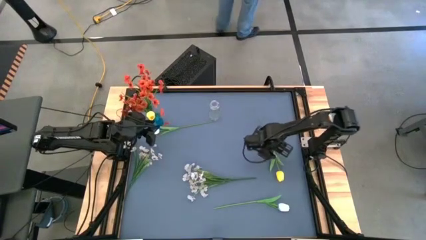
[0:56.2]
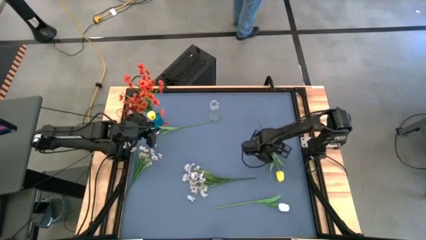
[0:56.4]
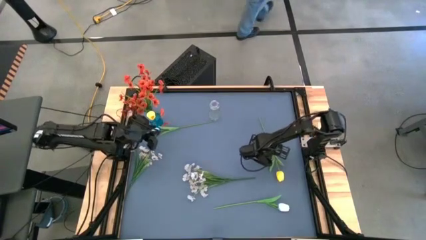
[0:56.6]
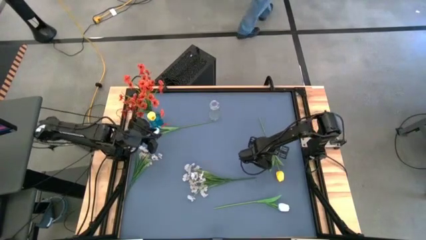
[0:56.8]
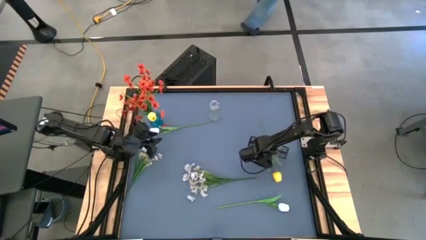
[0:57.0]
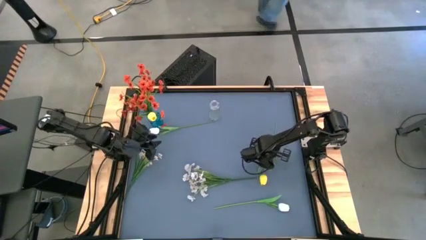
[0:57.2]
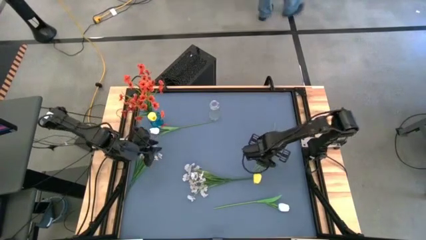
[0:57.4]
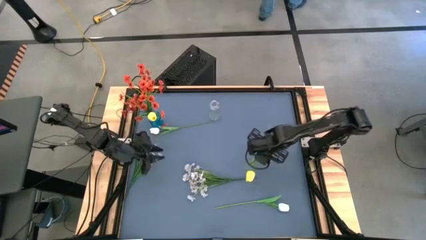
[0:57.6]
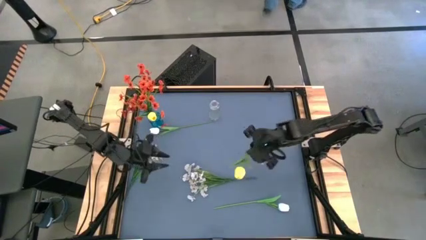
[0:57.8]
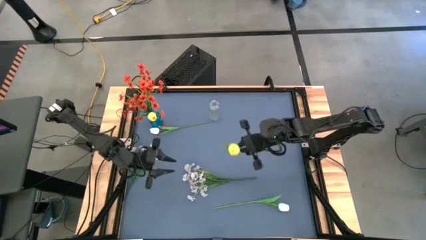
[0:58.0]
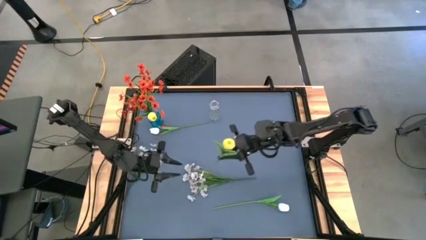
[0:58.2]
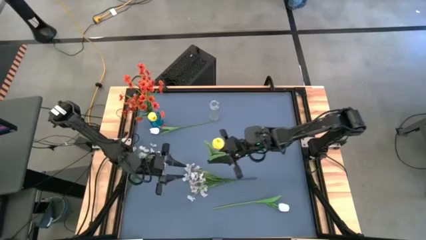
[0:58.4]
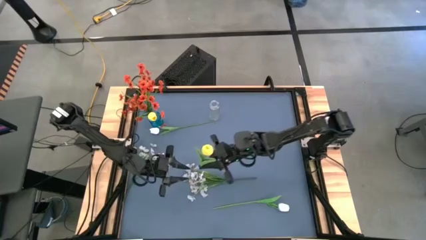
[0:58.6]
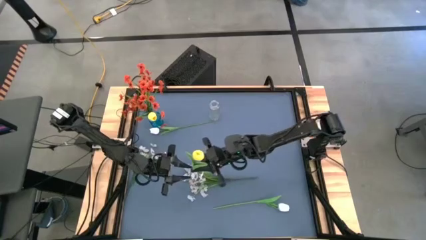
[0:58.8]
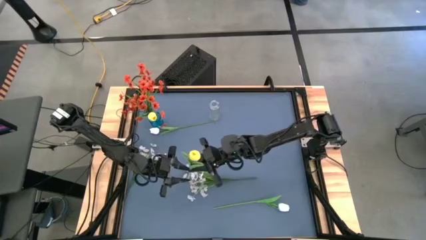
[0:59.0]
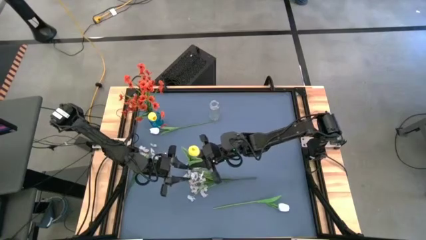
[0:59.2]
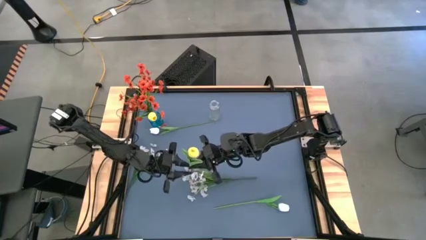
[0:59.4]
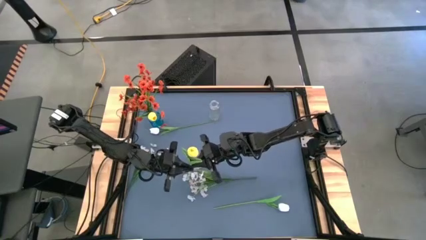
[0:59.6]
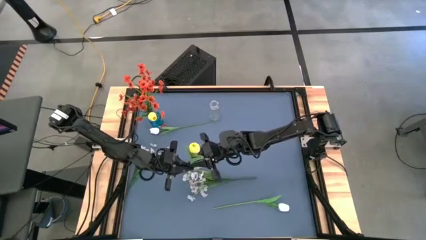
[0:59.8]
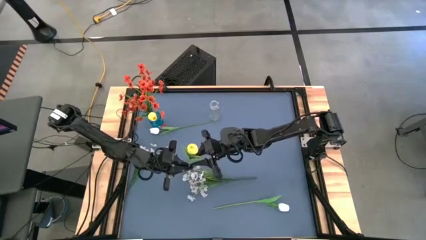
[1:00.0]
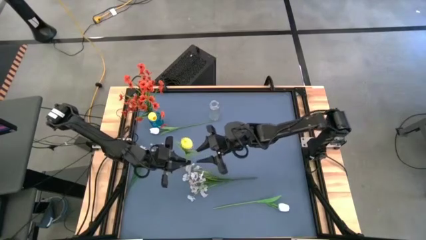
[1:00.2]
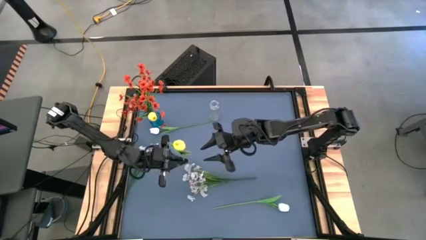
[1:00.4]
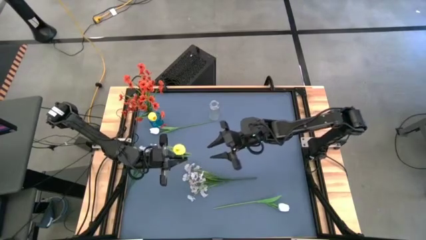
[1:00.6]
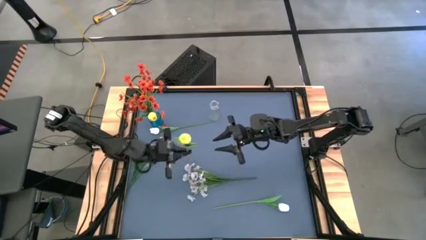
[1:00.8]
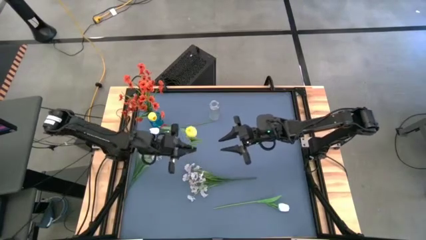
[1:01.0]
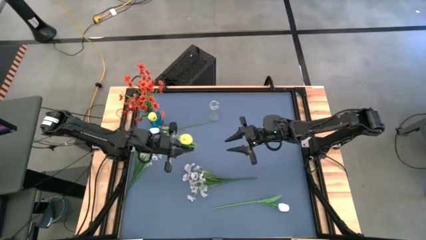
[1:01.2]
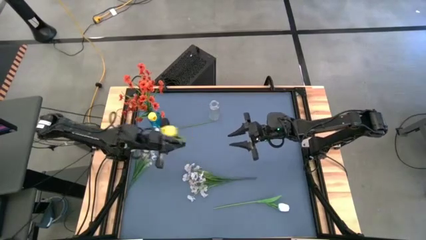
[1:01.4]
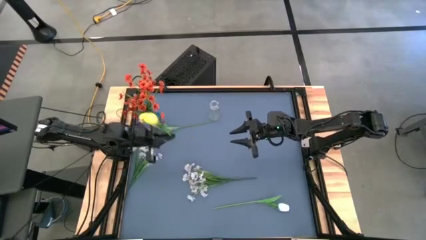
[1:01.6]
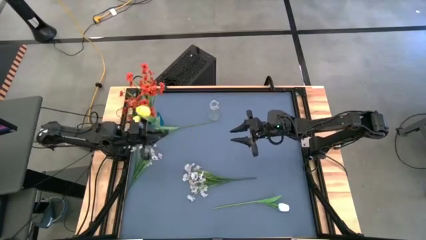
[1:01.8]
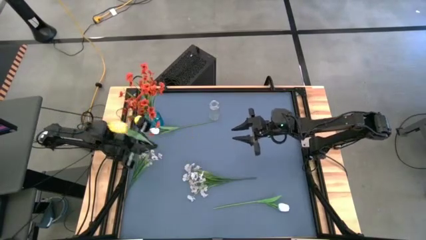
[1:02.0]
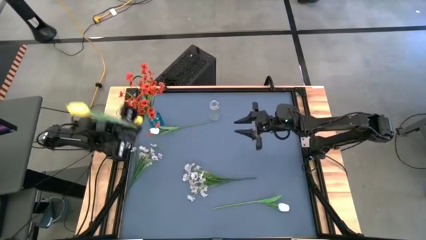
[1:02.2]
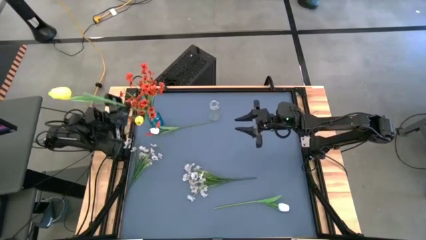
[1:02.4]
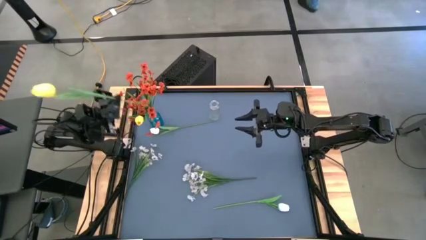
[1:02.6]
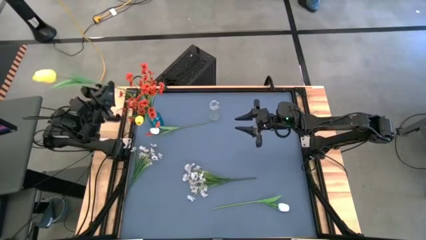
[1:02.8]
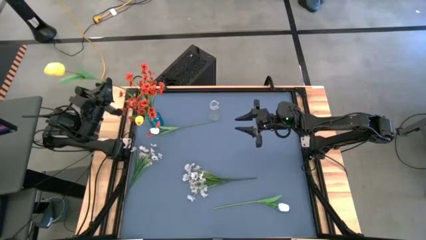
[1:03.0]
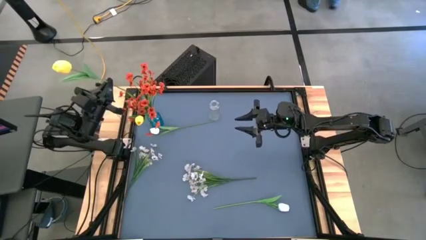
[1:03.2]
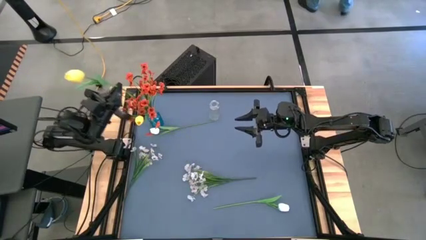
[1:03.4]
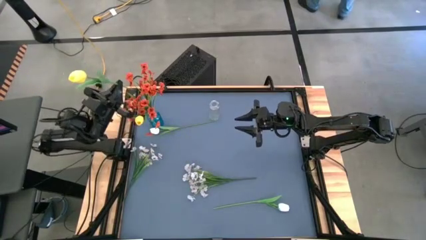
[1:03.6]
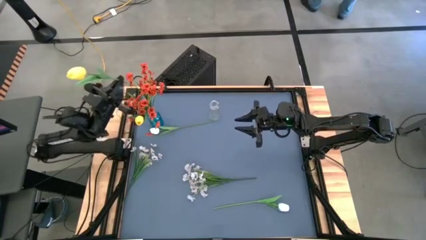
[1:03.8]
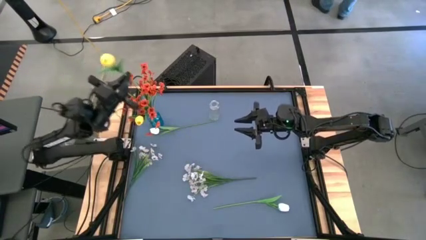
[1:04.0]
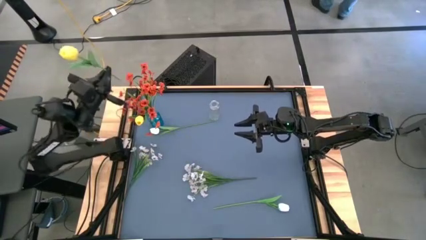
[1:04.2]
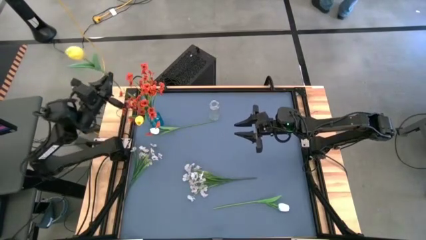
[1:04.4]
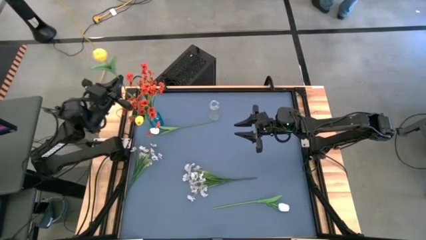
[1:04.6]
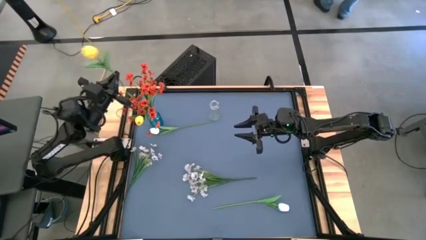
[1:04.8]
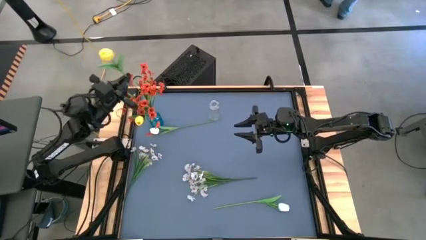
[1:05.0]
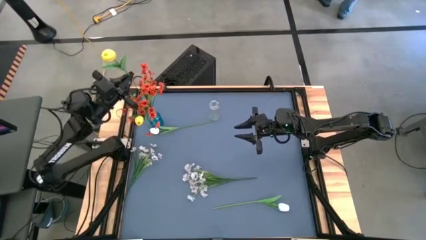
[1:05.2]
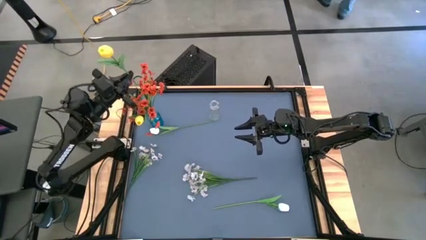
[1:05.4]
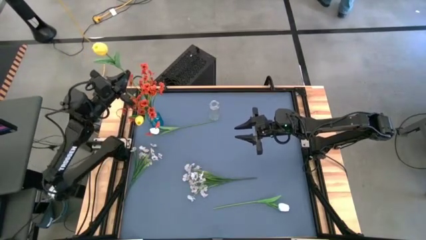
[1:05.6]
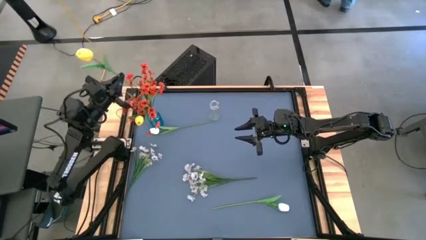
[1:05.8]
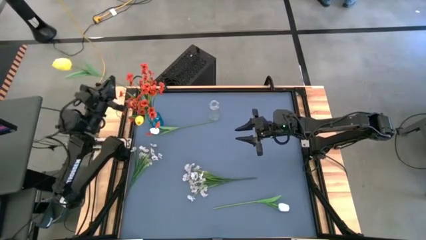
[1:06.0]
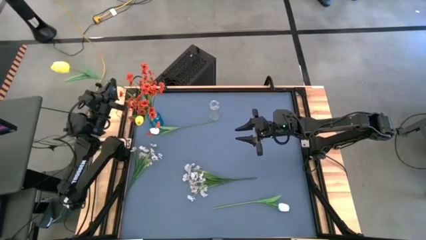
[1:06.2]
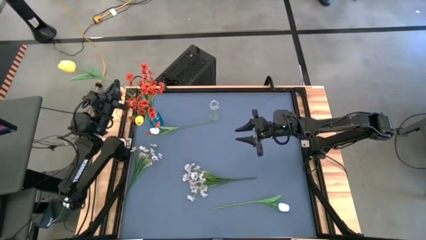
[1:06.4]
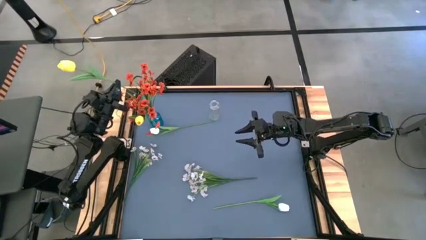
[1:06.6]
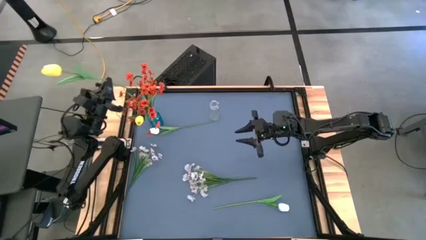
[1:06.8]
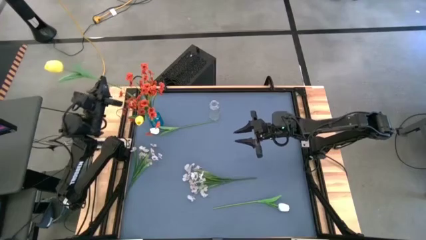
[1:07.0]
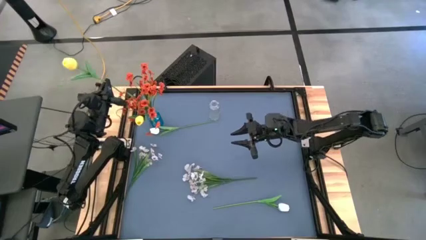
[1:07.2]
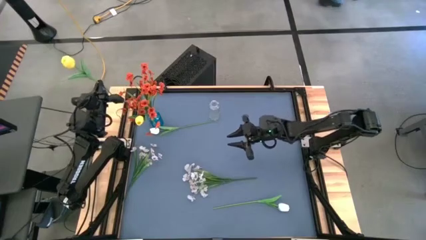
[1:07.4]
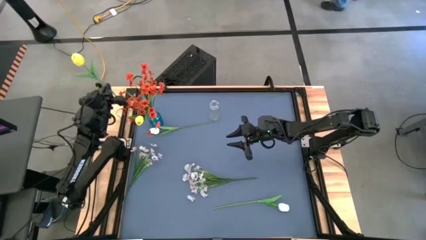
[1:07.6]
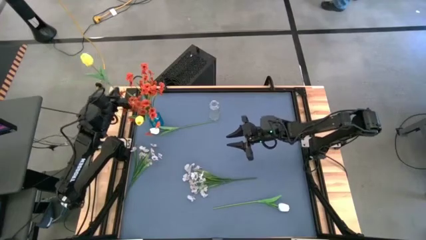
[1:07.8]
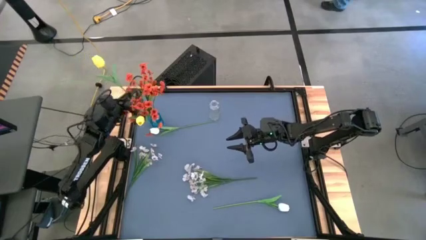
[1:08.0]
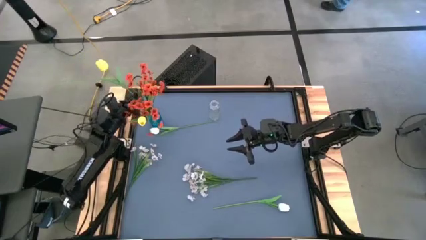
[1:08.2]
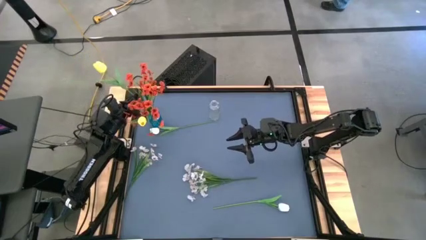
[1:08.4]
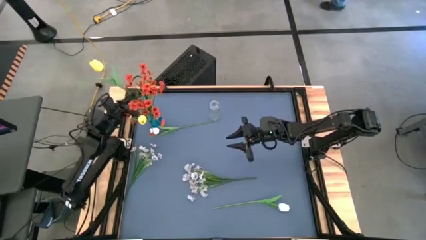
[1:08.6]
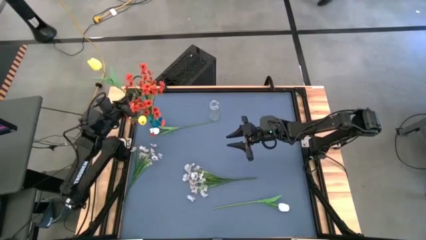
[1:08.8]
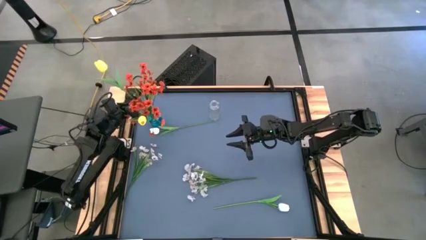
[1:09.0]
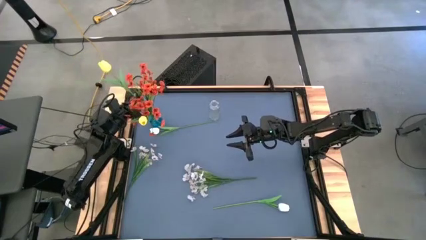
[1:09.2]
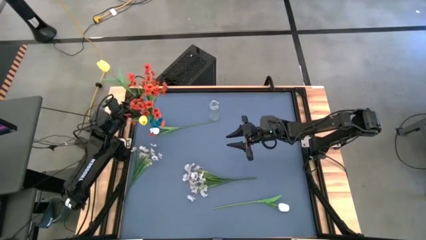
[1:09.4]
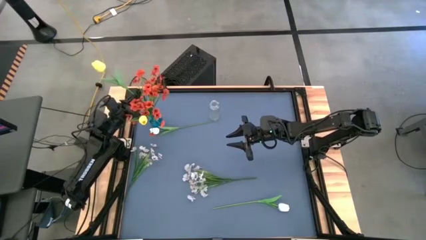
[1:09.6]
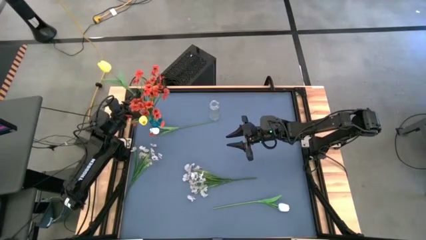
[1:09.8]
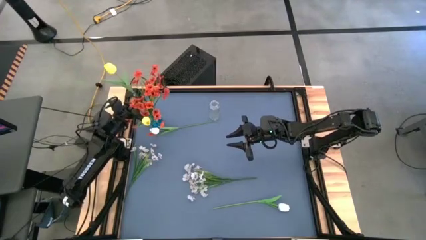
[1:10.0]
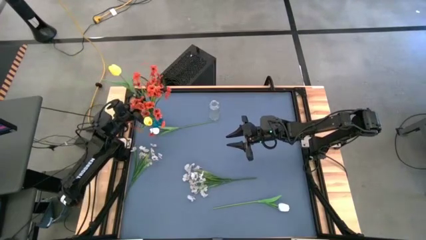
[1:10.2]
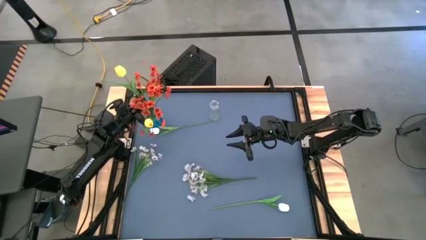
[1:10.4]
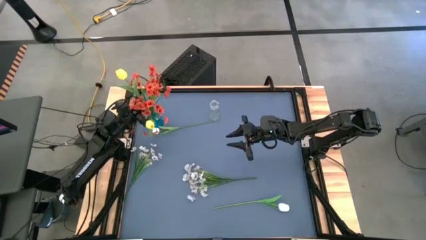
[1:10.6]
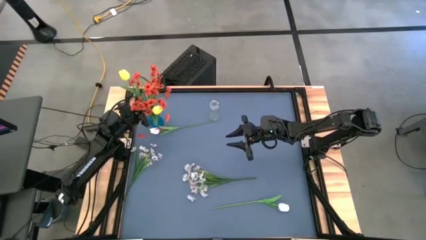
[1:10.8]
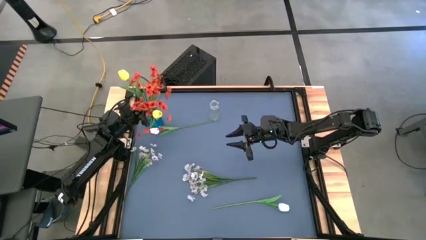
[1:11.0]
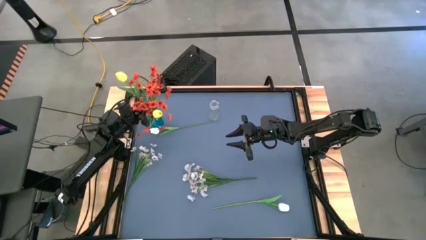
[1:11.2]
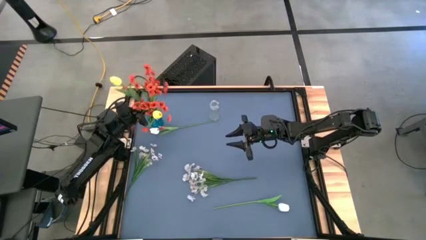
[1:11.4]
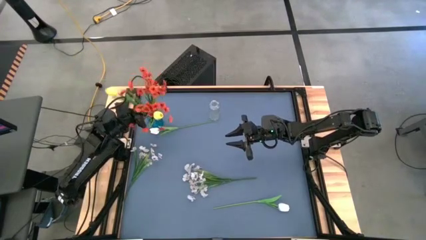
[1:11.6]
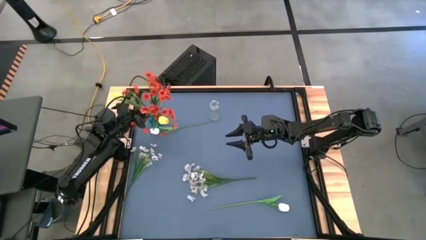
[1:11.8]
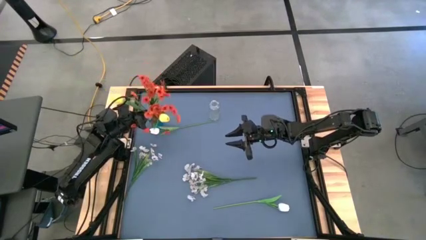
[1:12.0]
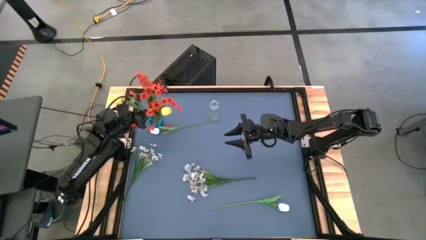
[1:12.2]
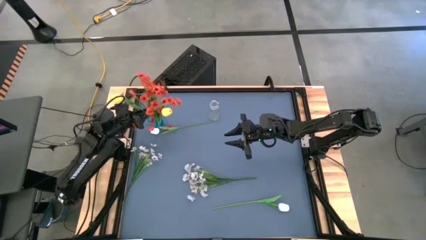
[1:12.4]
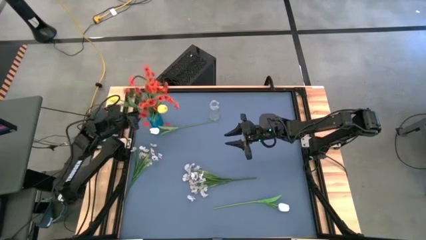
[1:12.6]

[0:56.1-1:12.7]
Task: Sort flowers into vase by color
Put the yellow tulip into the blue vase
